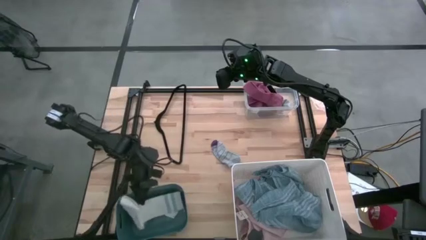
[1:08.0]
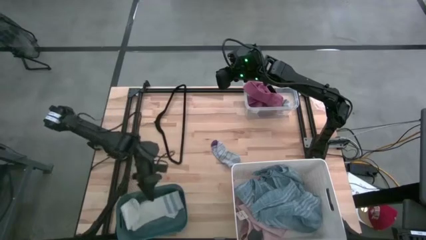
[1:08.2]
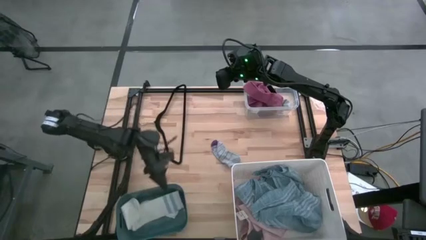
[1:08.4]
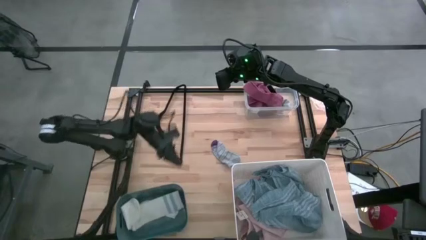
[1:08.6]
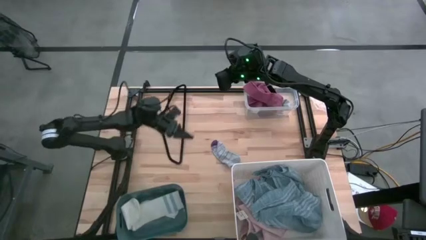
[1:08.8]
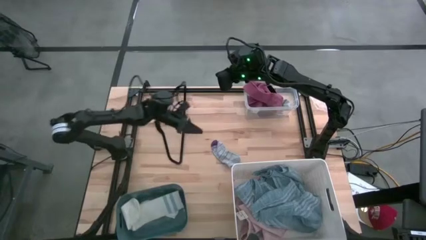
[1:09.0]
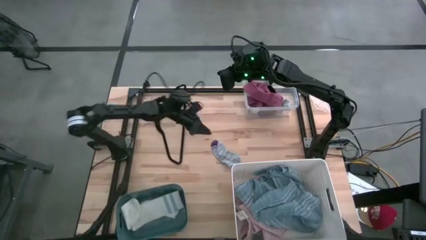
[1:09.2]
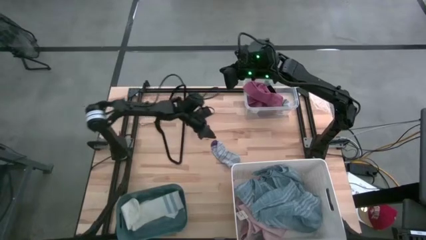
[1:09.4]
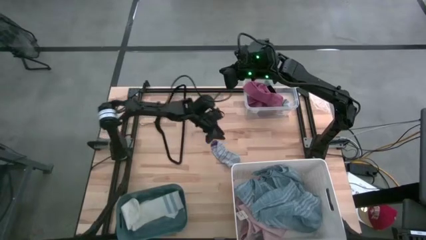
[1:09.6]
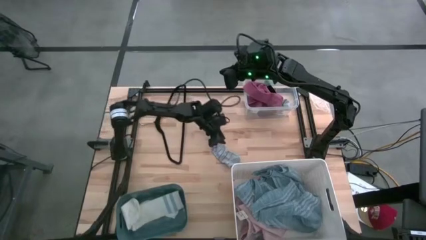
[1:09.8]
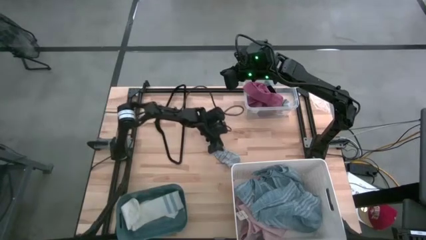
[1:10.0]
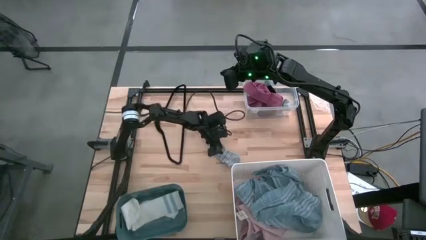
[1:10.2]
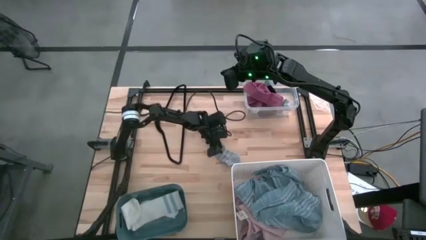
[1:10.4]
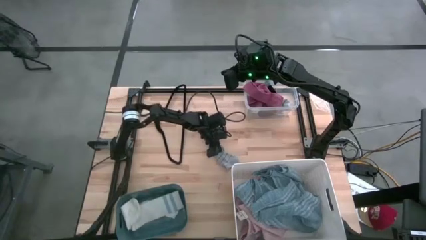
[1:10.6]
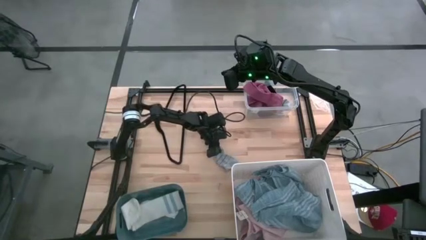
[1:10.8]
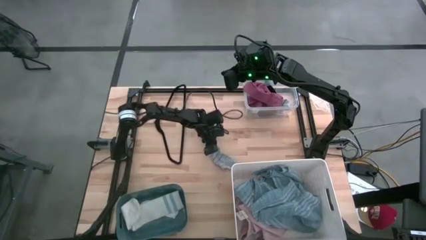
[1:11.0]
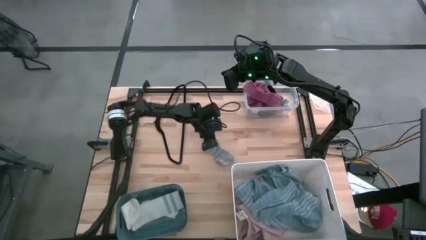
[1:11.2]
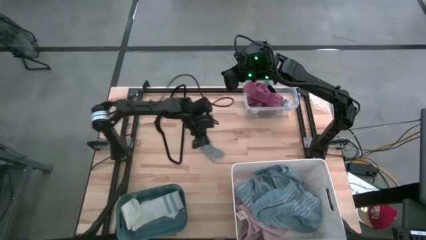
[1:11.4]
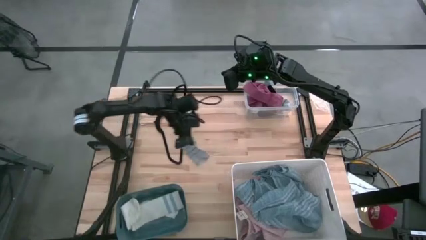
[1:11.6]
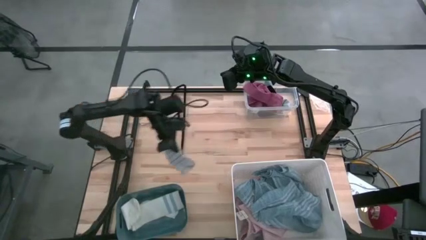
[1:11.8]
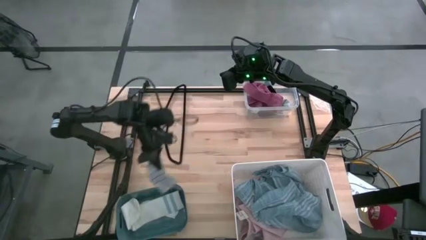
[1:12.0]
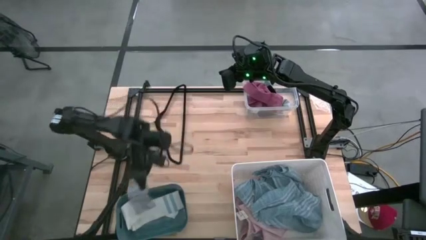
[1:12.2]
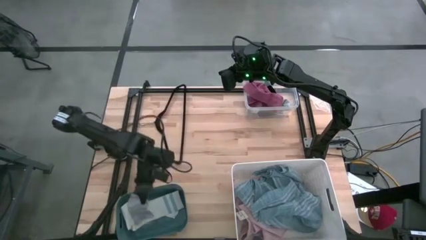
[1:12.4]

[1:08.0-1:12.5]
Task: Pick & Place Cloths
Put the grey sock into the blue bin

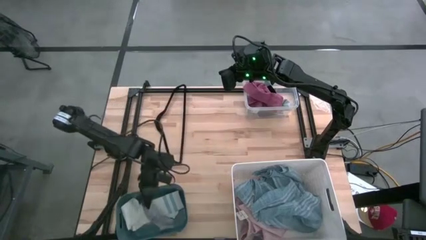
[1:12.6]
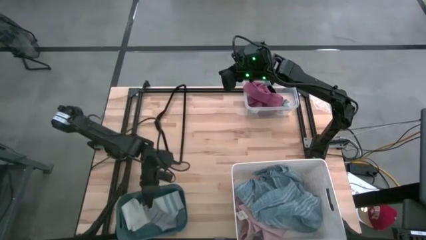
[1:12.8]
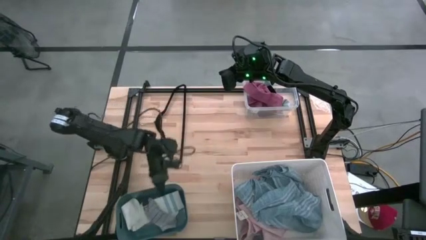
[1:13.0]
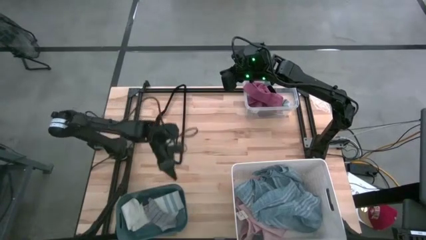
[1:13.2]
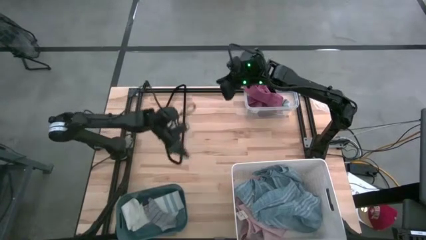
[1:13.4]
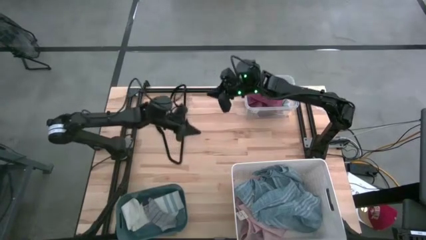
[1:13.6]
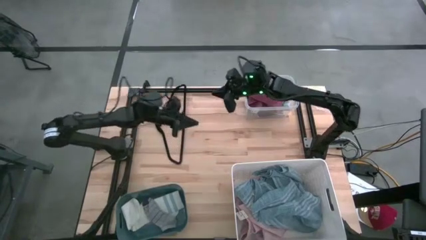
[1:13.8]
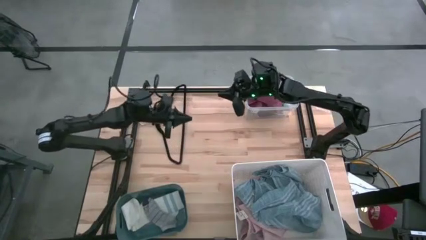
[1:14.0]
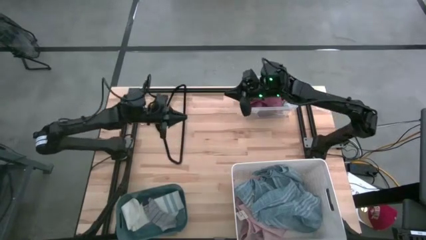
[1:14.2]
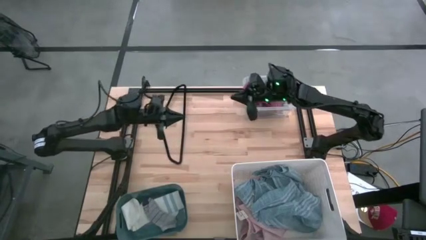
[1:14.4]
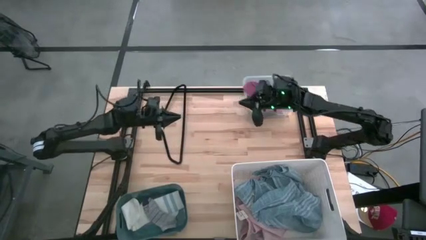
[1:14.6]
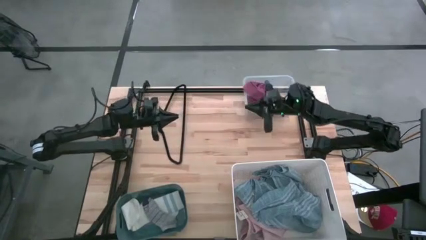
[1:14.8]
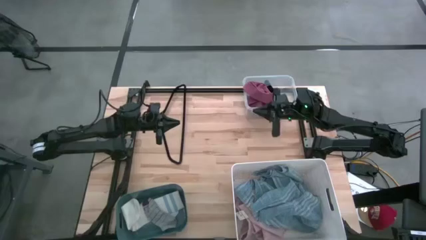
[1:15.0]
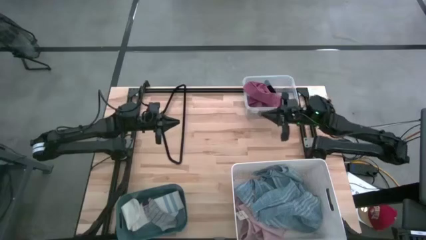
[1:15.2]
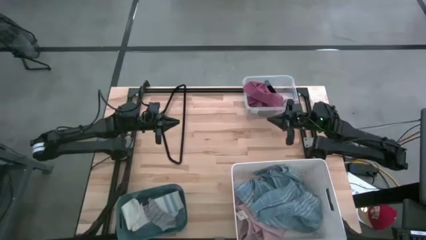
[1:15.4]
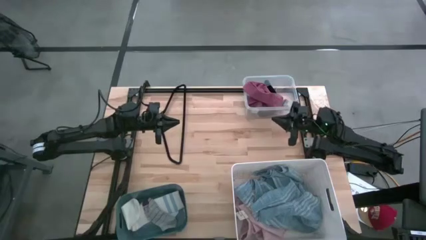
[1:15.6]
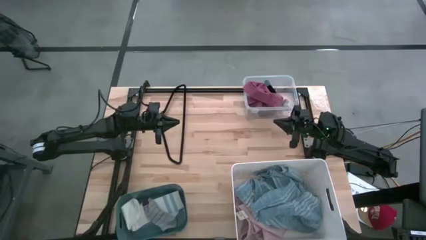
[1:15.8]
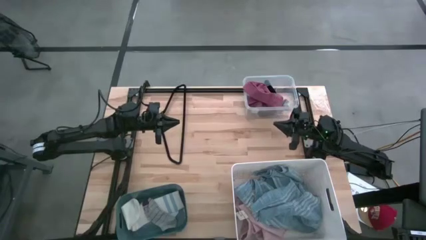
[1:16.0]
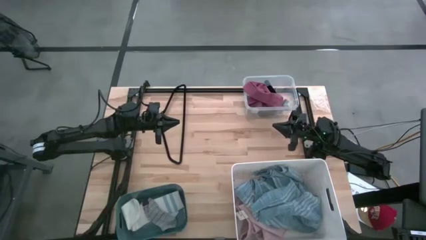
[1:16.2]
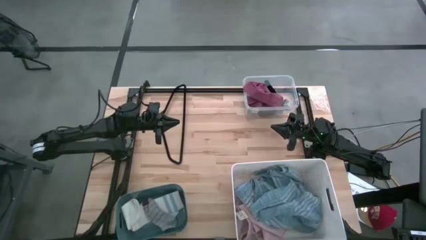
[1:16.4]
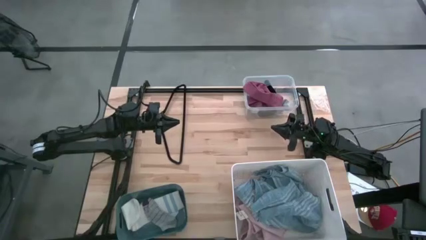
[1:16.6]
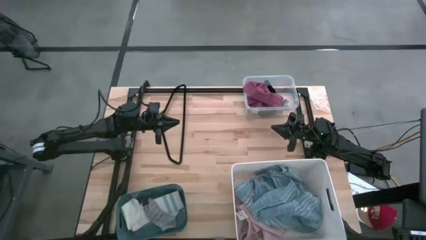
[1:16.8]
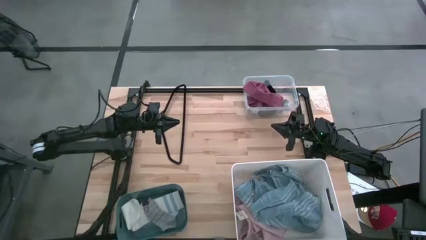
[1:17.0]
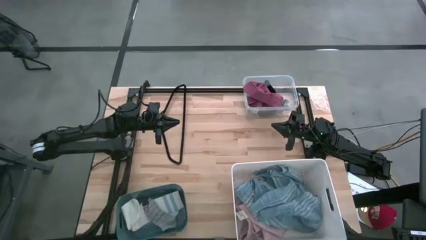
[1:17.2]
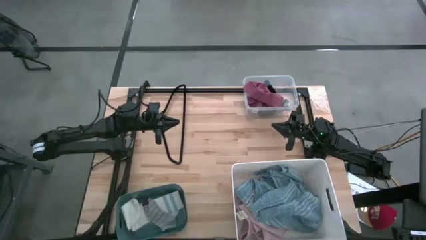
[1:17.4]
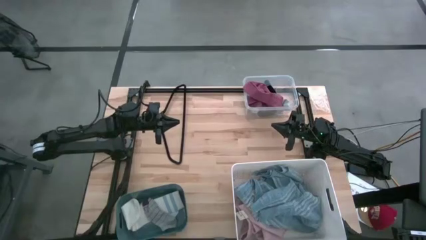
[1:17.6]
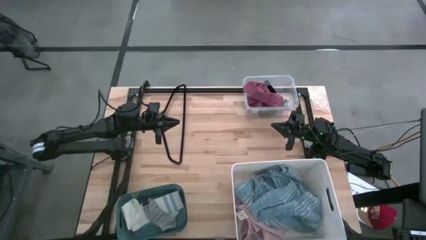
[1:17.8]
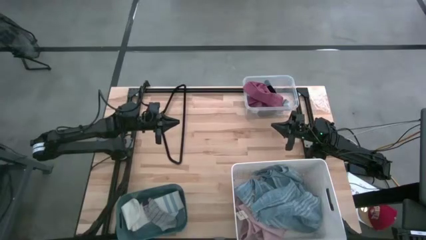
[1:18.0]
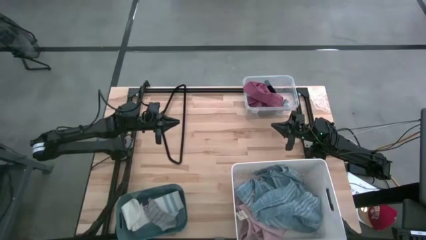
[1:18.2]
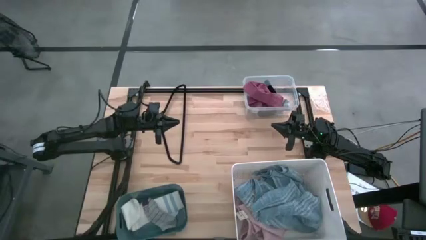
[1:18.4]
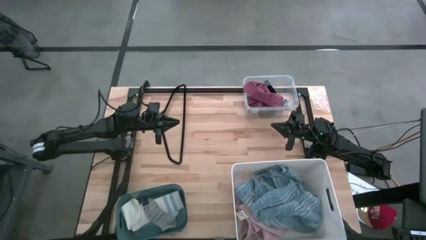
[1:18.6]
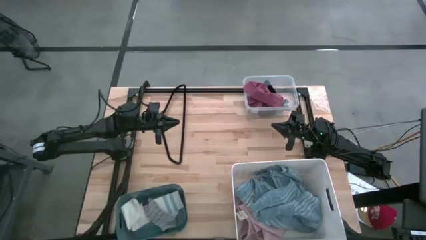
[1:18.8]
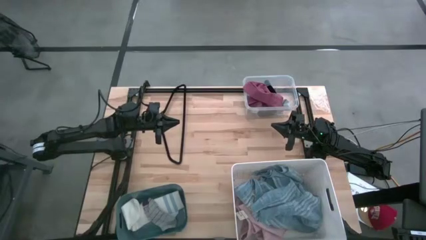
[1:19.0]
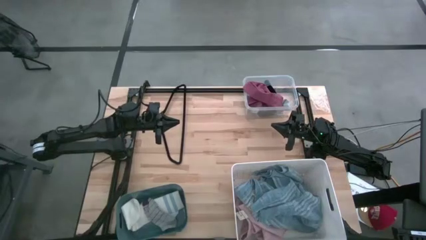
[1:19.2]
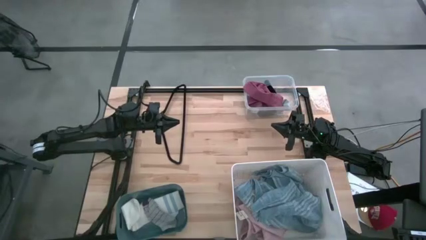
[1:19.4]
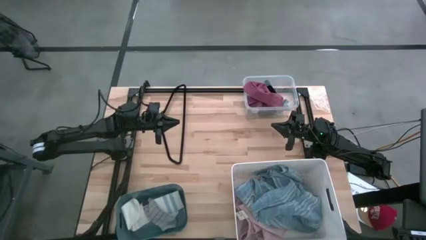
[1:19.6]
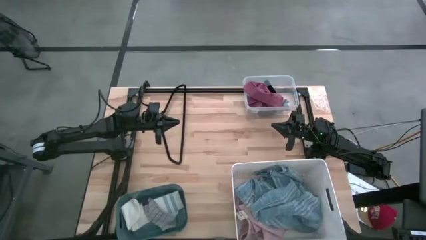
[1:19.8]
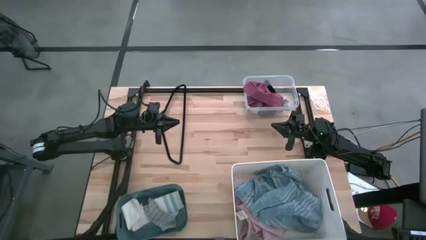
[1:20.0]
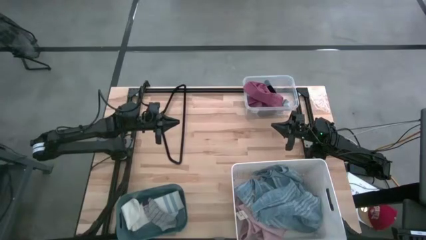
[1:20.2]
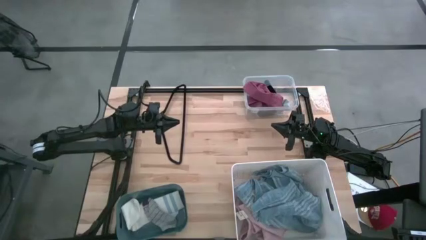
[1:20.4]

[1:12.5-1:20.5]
Return to Home Position

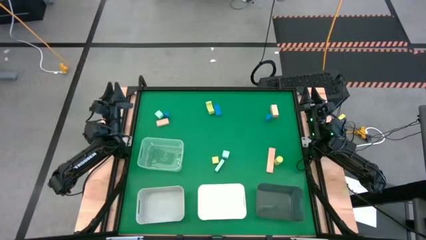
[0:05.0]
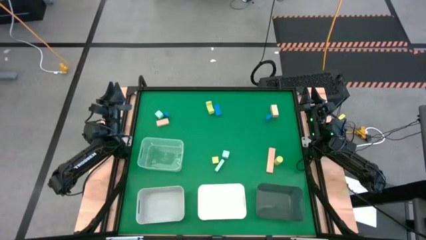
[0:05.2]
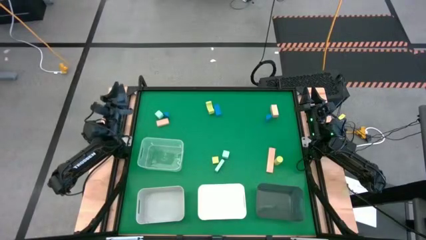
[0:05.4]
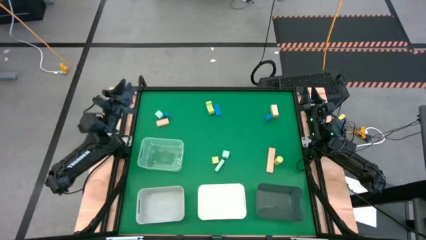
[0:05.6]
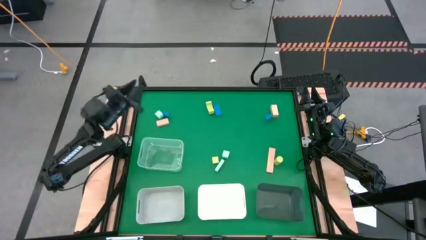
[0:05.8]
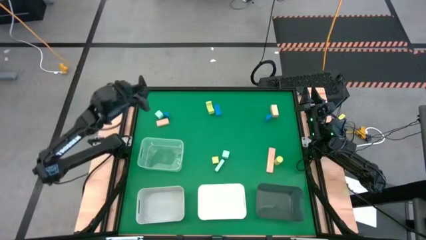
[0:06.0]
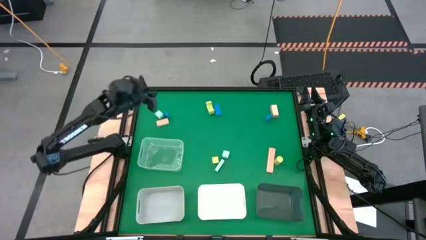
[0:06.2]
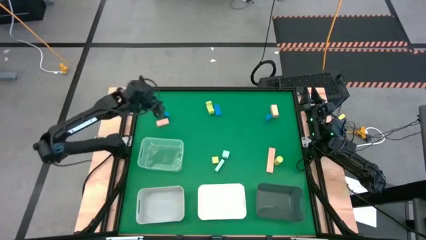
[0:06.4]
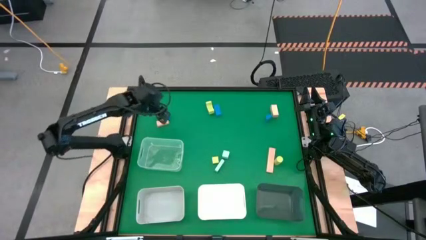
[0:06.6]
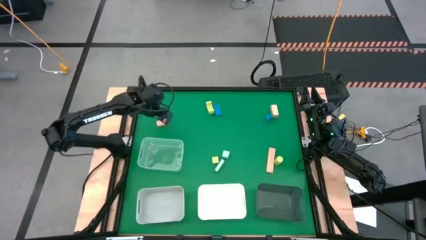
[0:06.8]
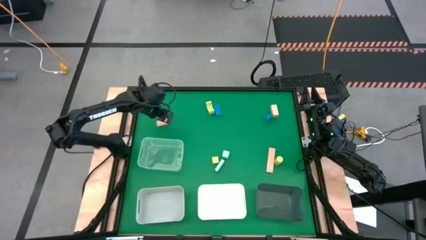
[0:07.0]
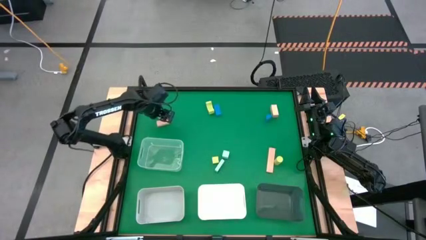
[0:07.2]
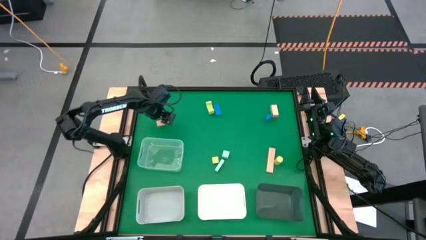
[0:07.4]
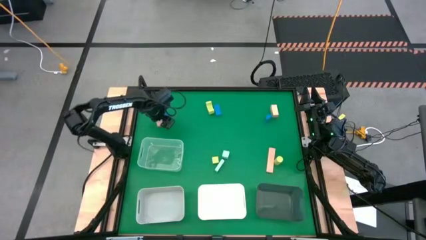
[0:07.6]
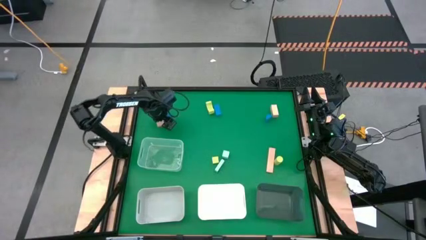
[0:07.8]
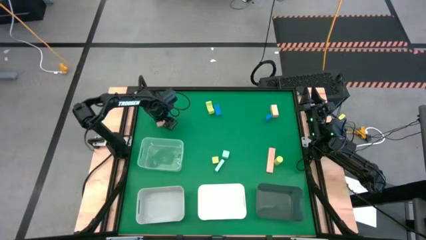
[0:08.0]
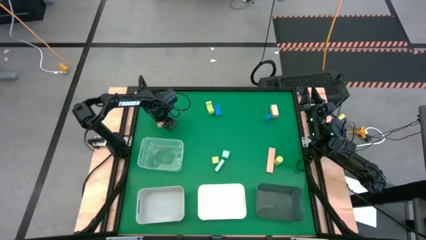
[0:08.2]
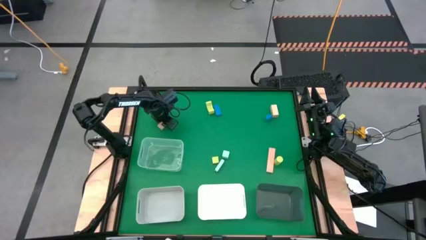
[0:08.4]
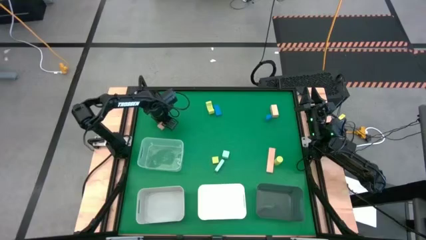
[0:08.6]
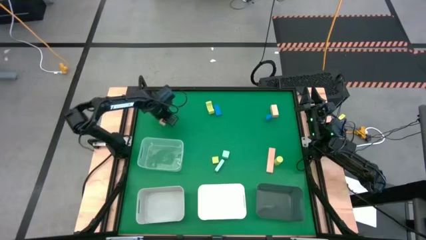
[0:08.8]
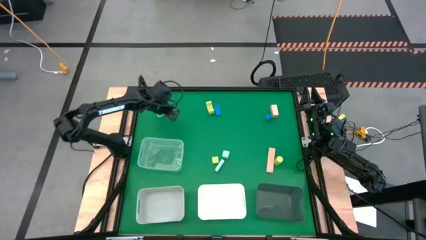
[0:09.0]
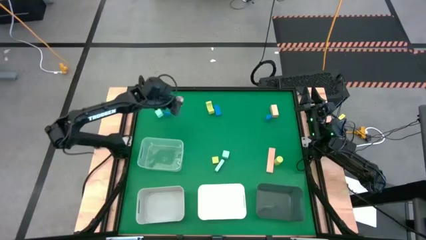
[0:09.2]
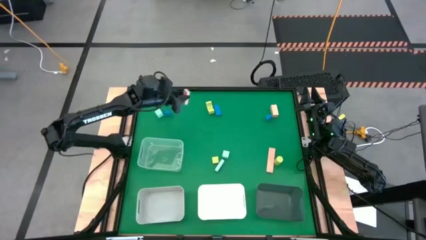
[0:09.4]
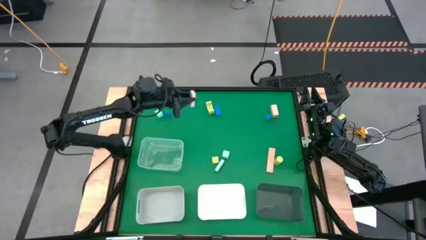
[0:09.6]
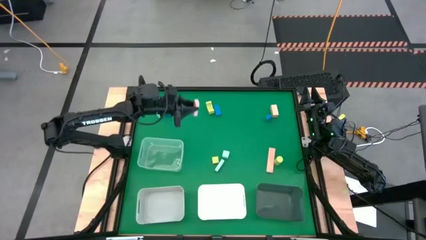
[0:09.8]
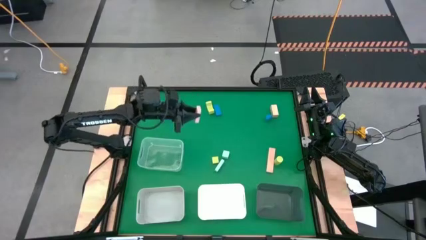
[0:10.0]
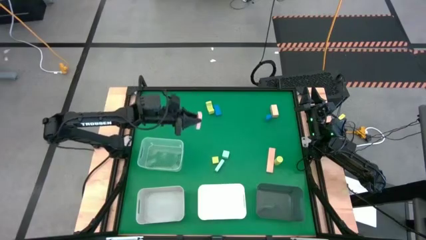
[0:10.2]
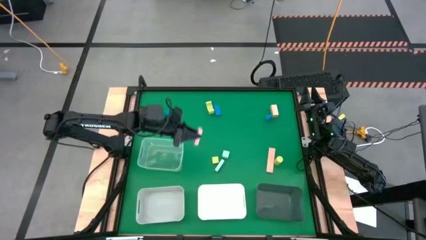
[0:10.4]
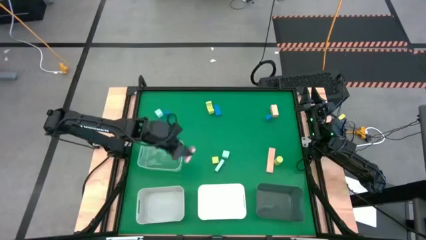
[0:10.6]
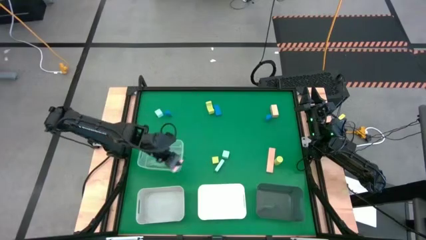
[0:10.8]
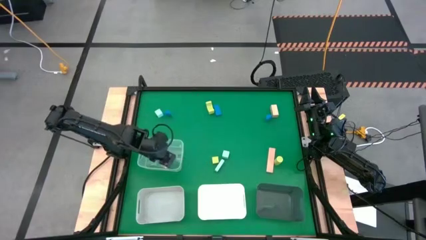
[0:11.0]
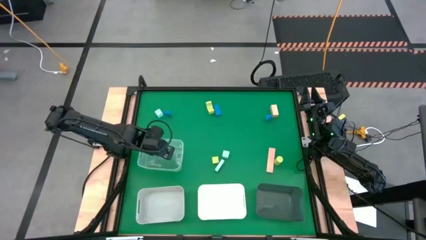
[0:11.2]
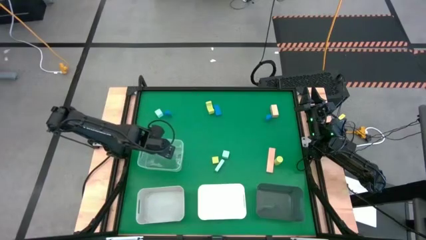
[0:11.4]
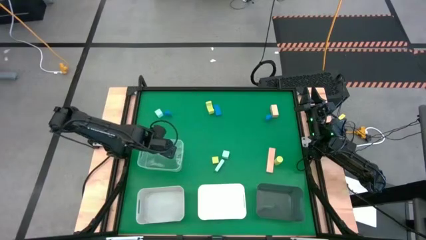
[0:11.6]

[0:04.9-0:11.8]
Task: Sort & place blocks by color
Put the top left light brown block into the transparent bin
